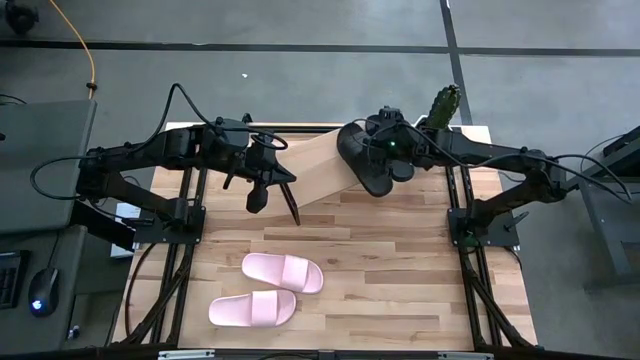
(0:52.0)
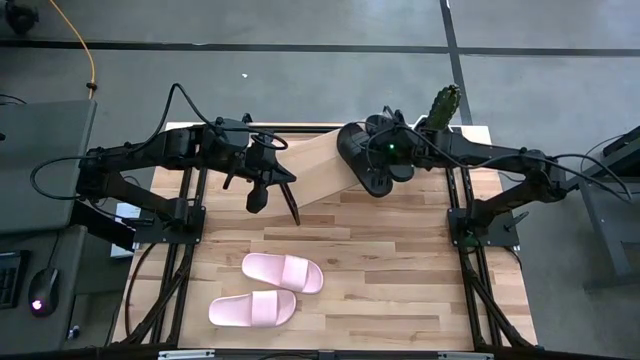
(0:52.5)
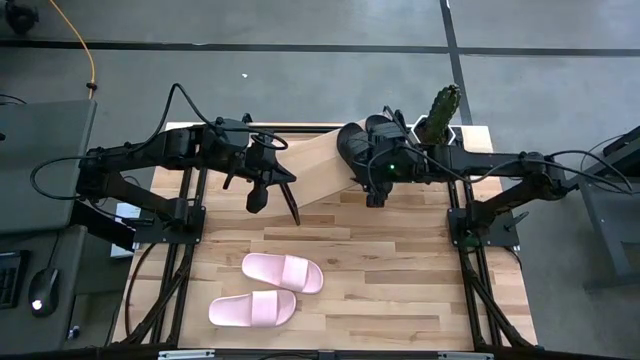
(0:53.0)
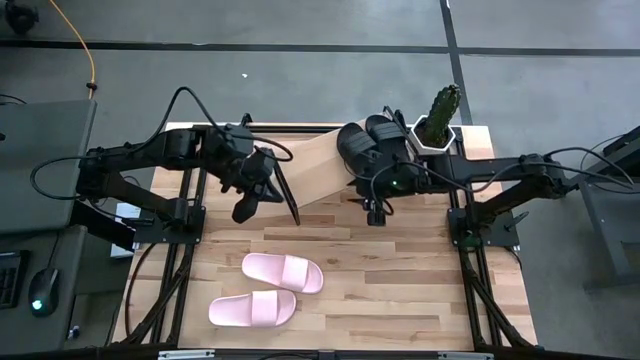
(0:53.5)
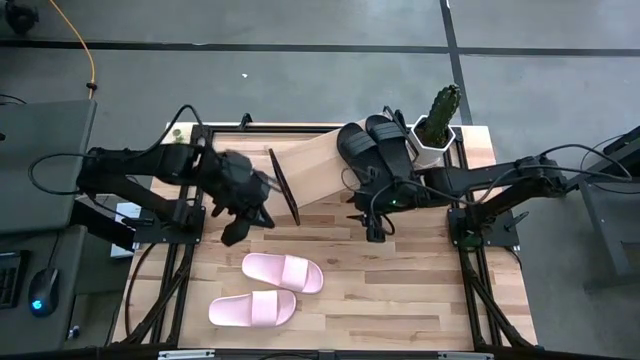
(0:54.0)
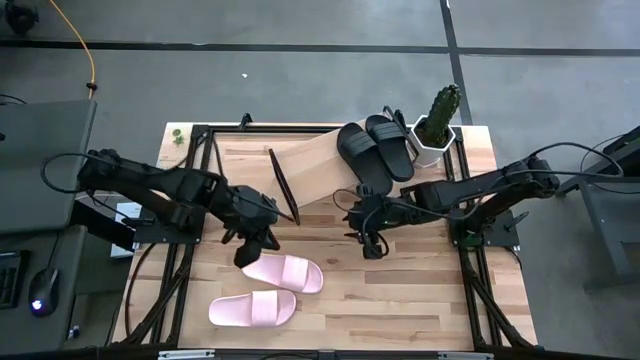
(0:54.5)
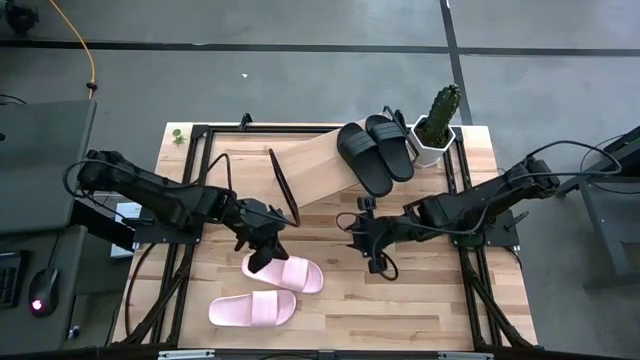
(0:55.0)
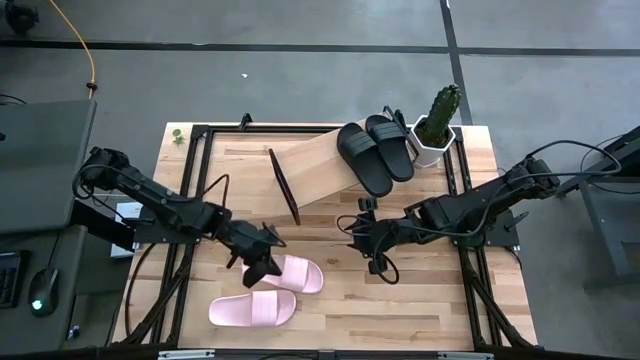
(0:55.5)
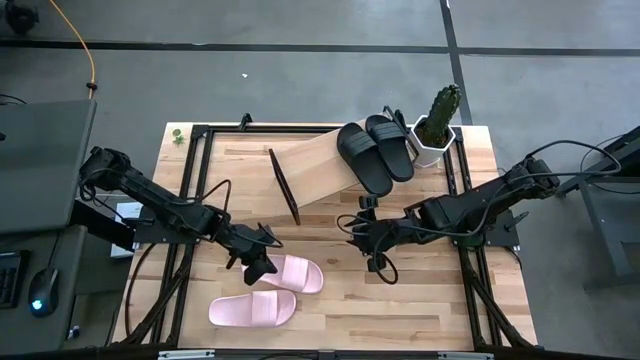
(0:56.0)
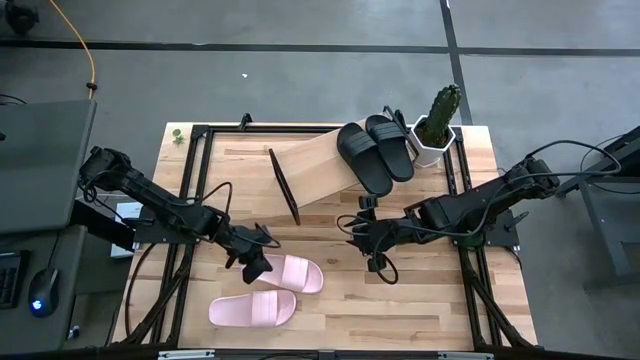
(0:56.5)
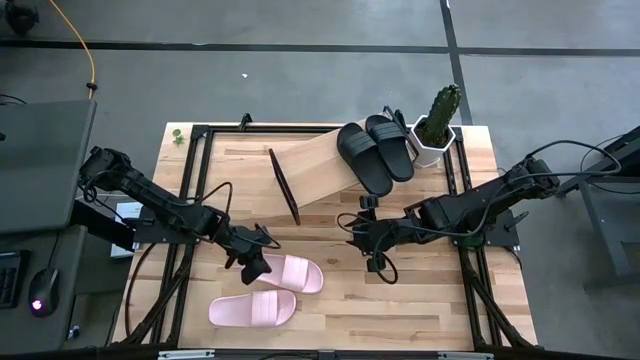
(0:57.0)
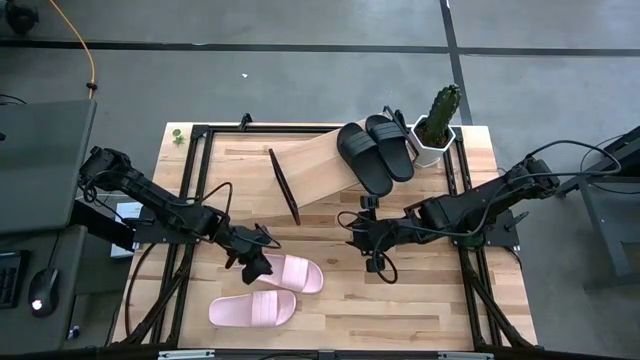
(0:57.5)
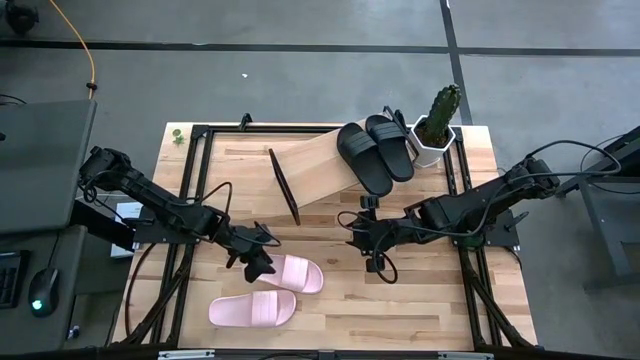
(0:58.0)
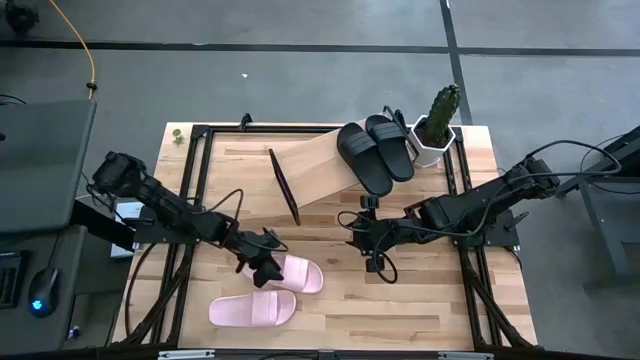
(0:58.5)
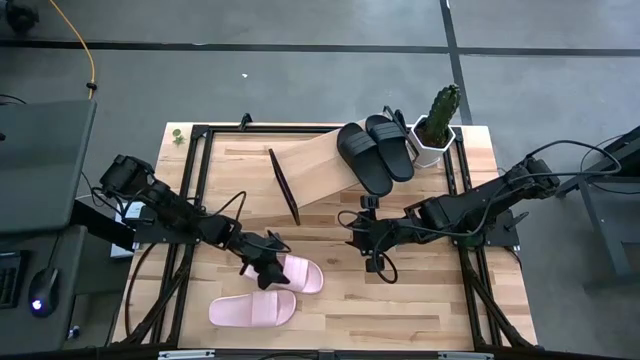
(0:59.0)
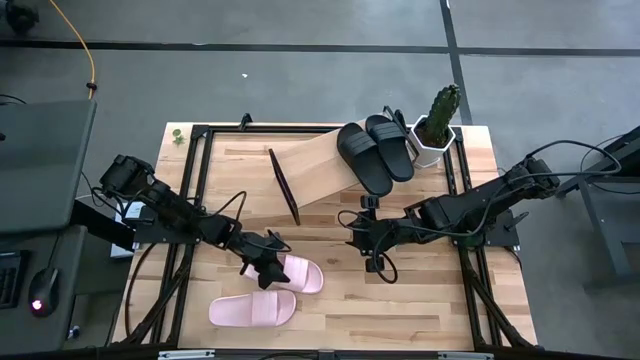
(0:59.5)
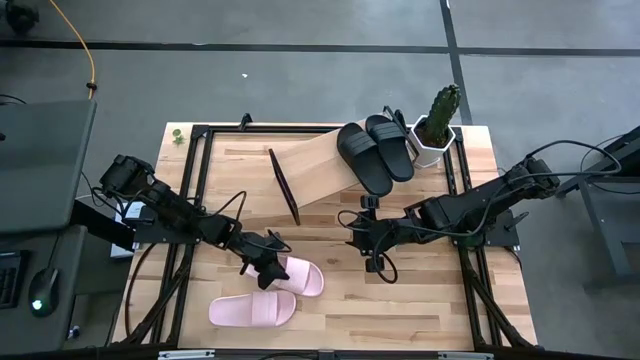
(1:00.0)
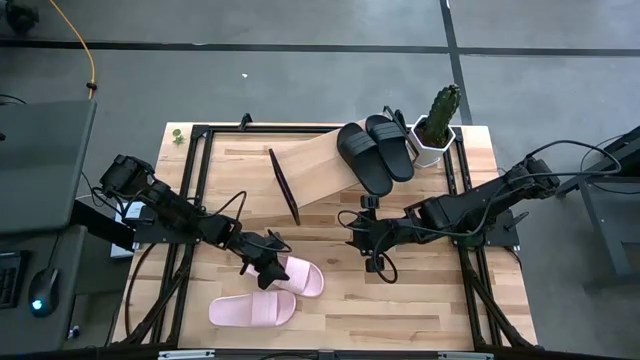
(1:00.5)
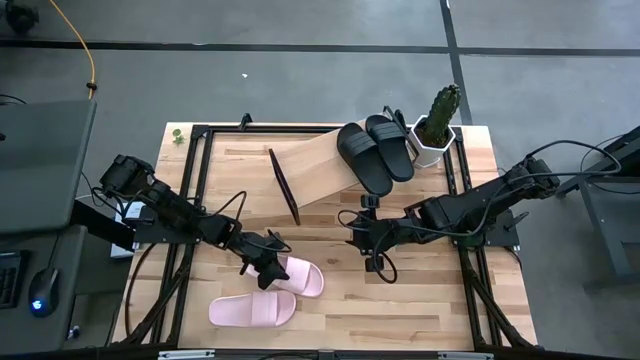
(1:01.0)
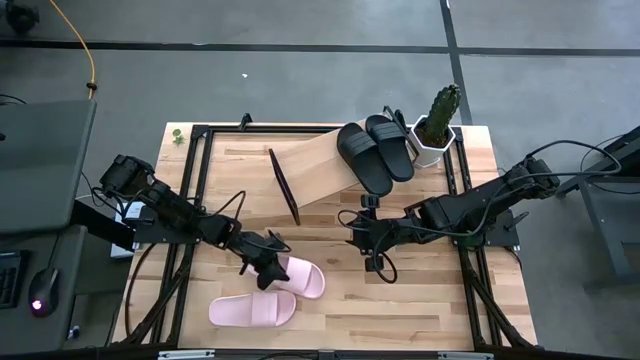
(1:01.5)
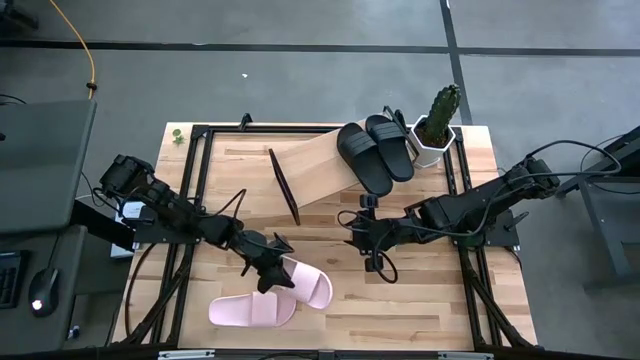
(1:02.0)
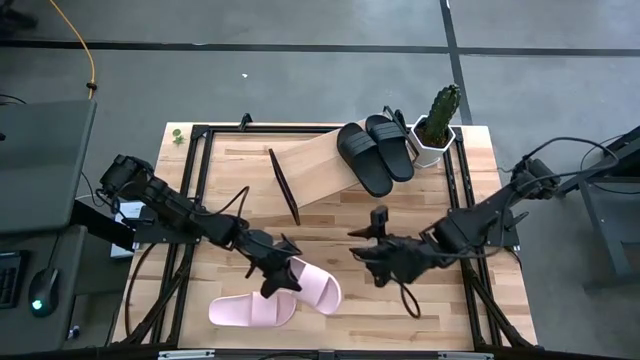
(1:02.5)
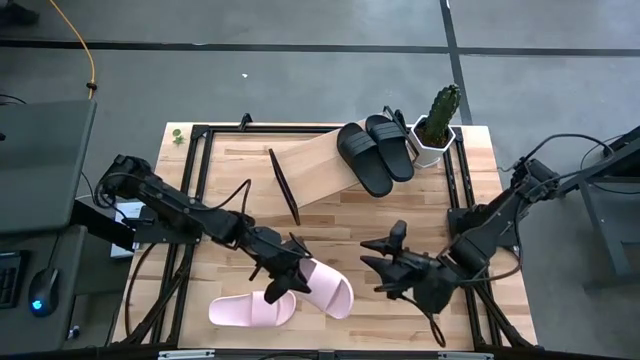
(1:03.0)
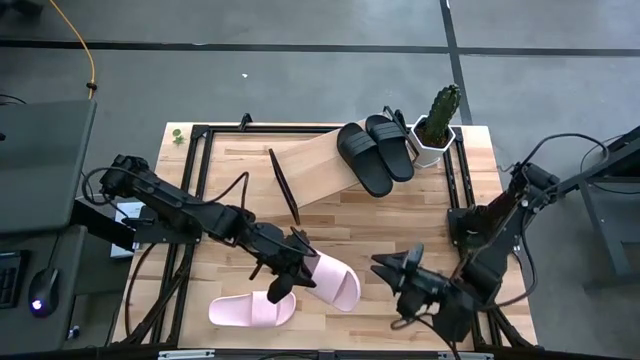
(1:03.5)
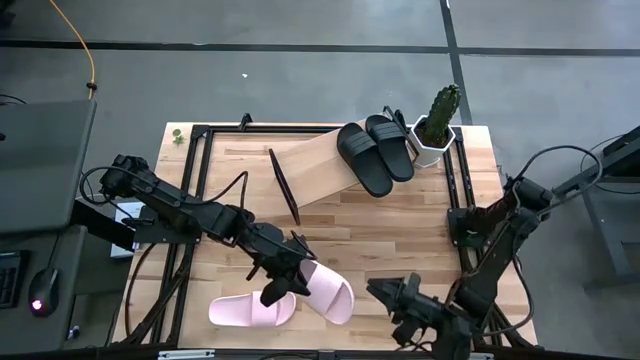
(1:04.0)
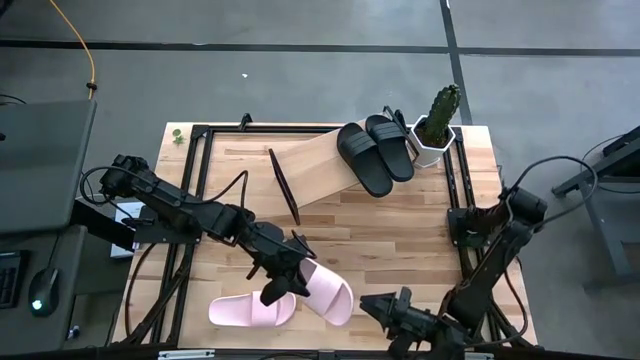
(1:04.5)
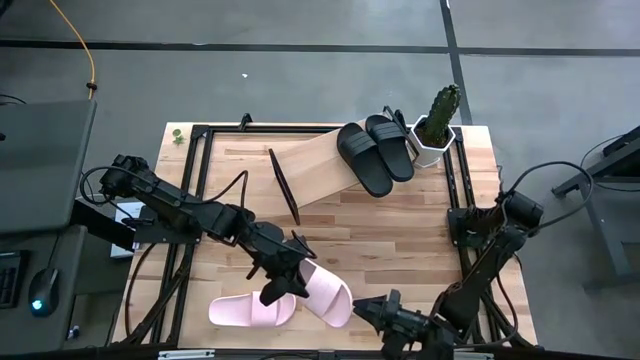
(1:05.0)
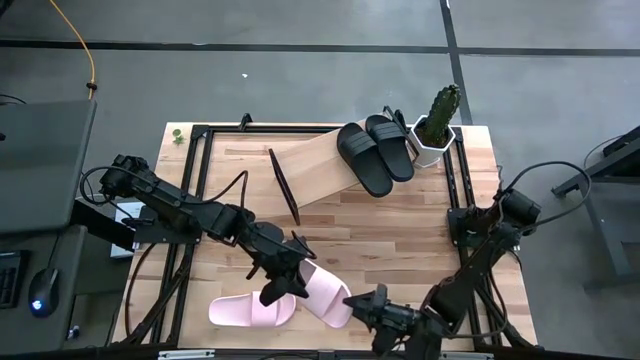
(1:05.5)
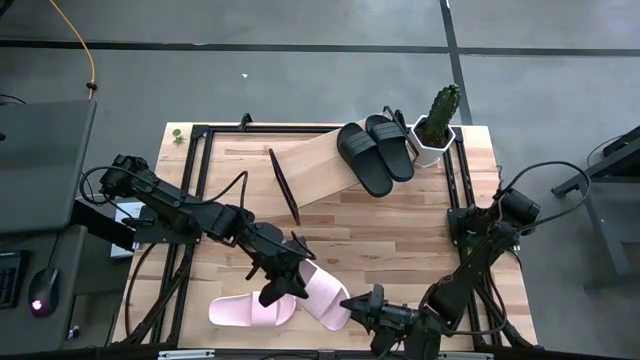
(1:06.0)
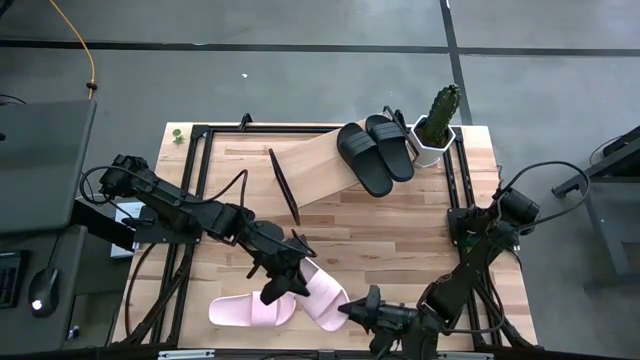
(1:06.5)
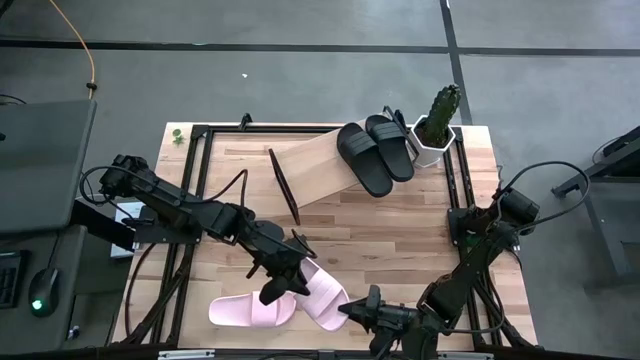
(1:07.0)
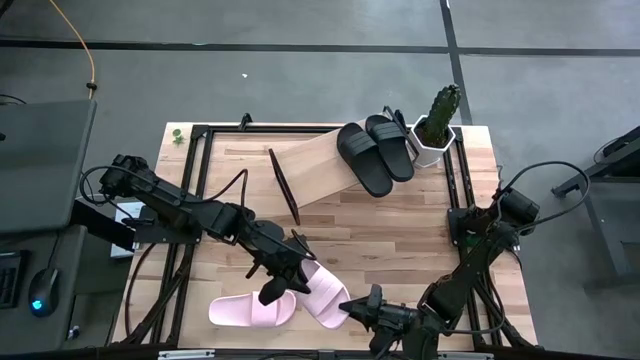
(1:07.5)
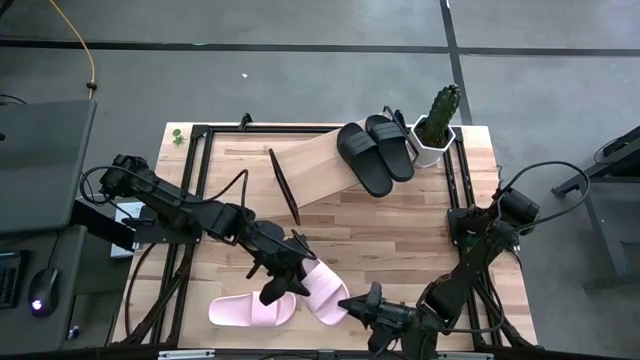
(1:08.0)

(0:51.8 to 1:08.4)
Task: Pick and place slides into the shelf
Put the right pink slide on the shelf
